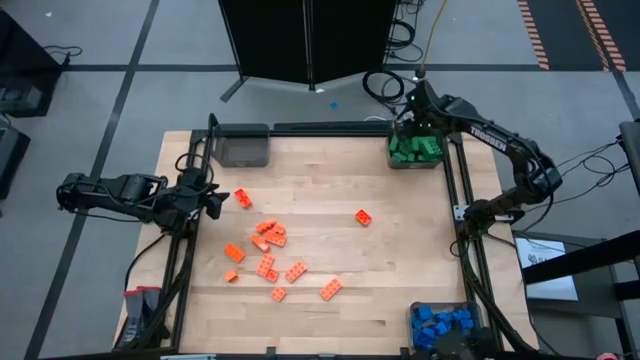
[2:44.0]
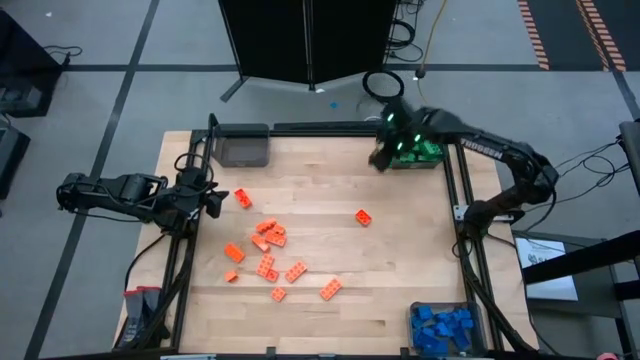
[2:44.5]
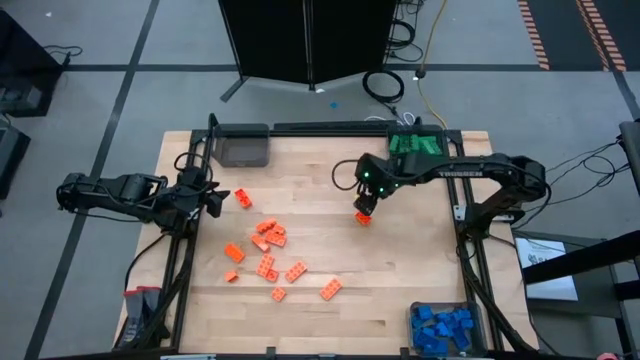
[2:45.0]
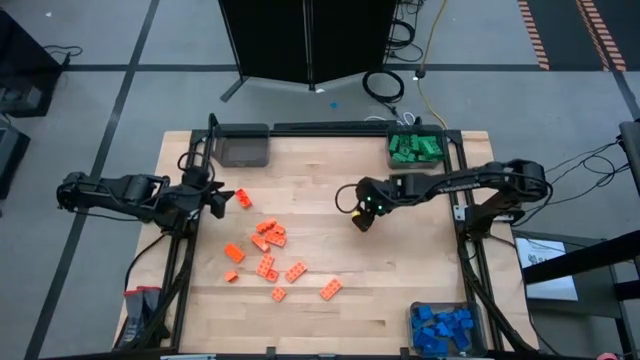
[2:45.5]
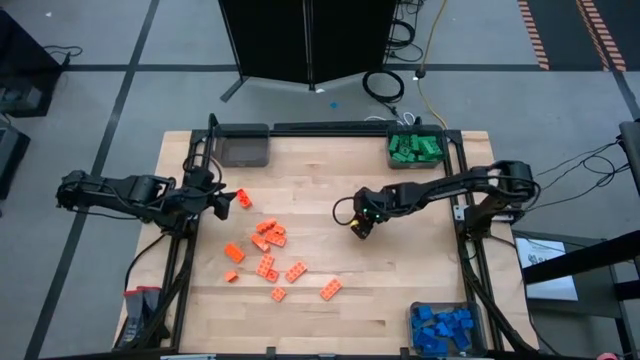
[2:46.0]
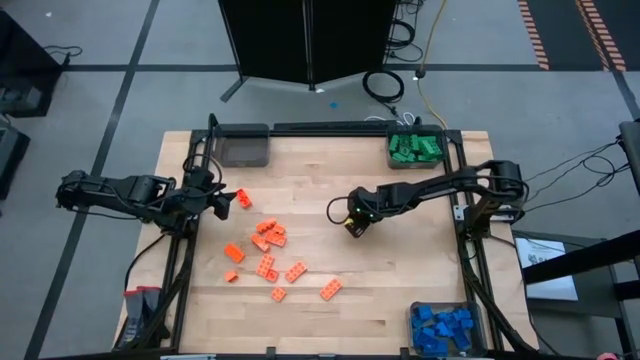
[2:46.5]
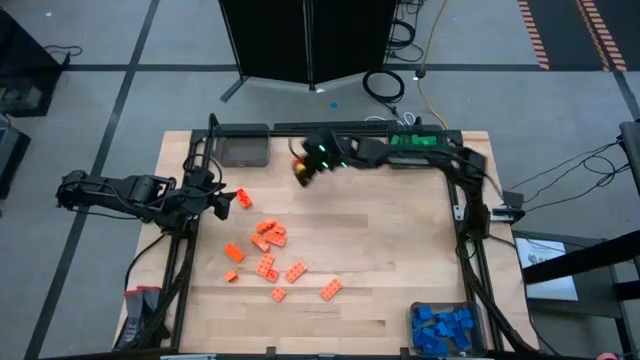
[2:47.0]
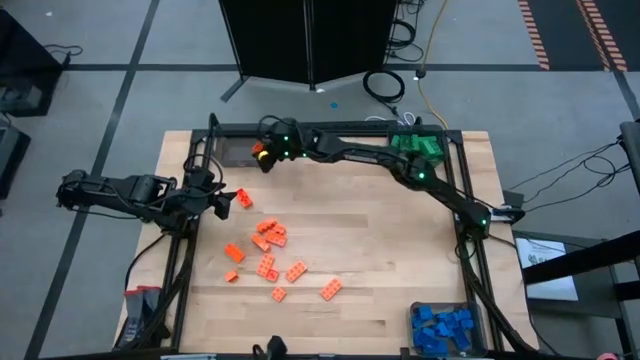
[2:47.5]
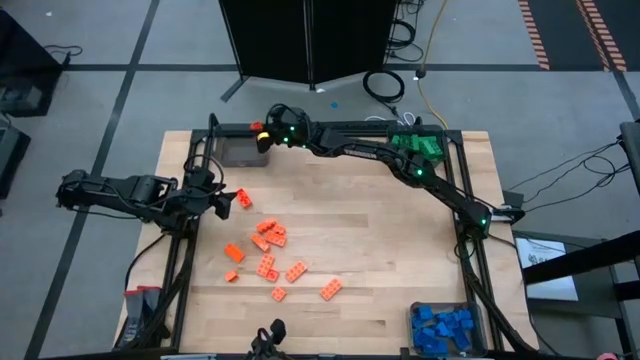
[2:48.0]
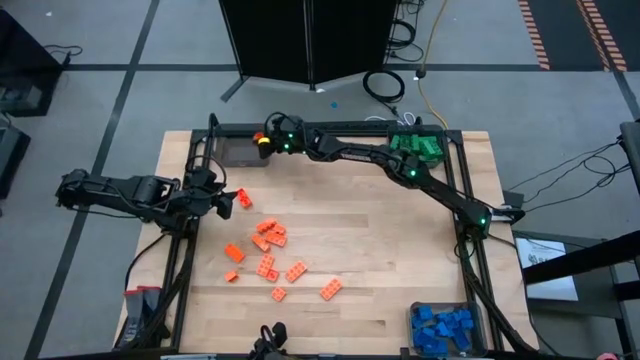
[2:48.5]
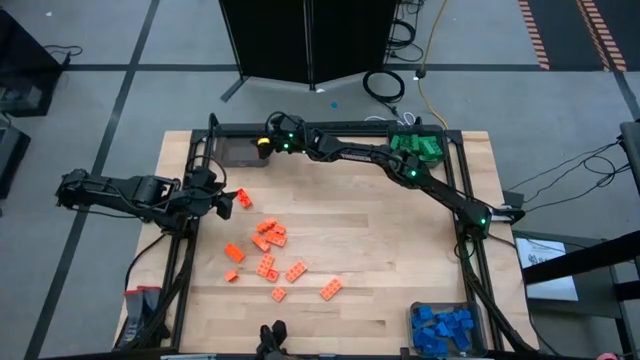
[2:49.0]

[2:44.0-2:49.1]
Task: Sort blocks
Put the orange game piece into the top left black bin

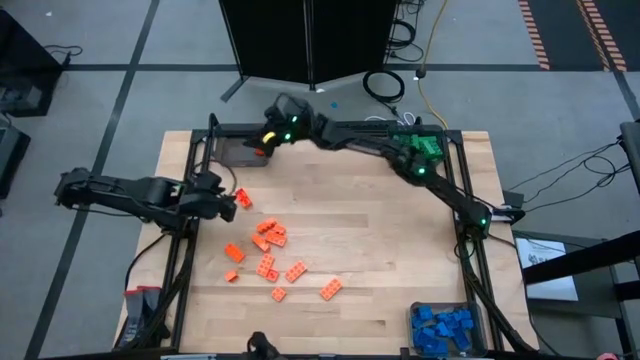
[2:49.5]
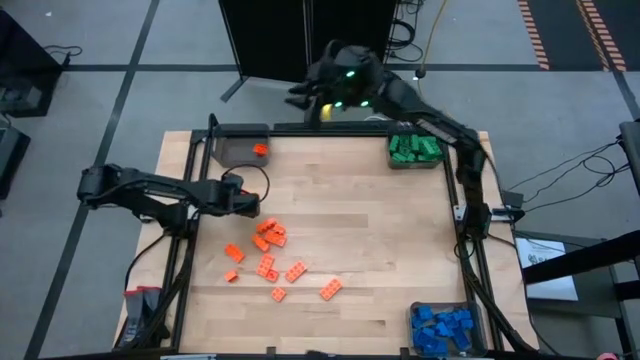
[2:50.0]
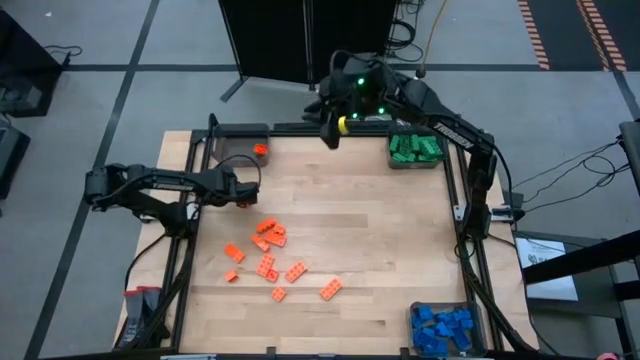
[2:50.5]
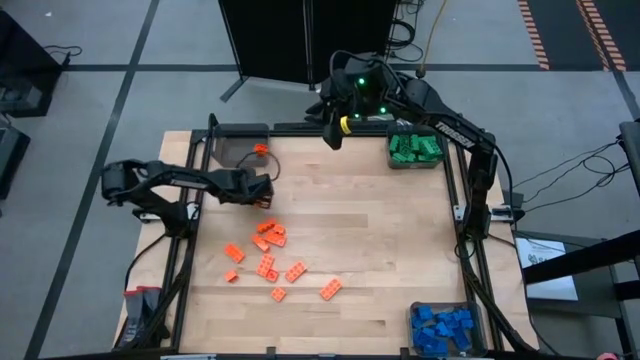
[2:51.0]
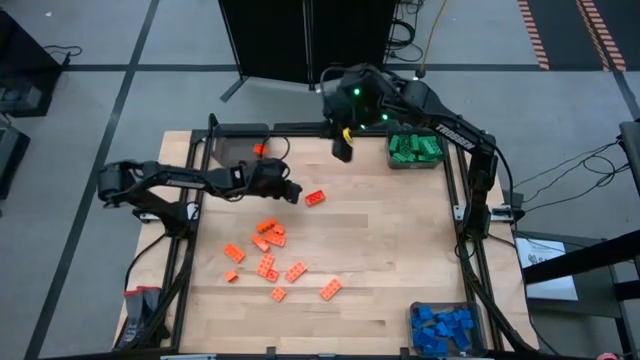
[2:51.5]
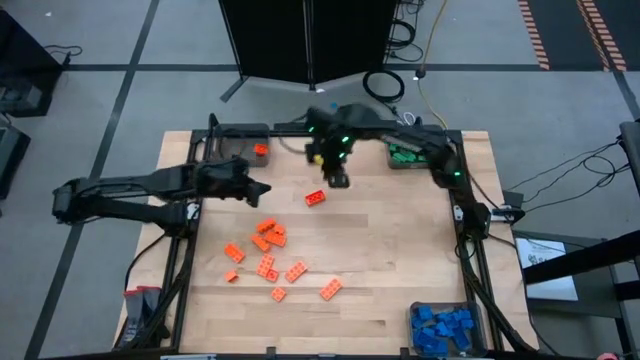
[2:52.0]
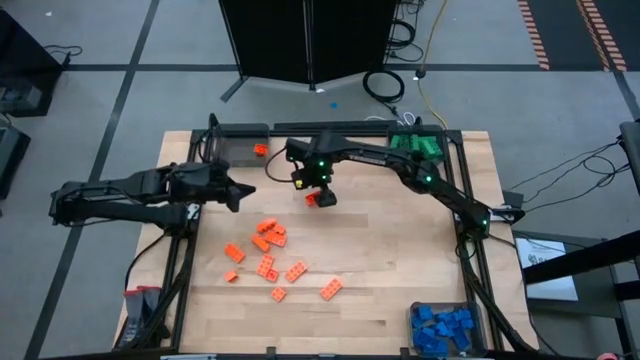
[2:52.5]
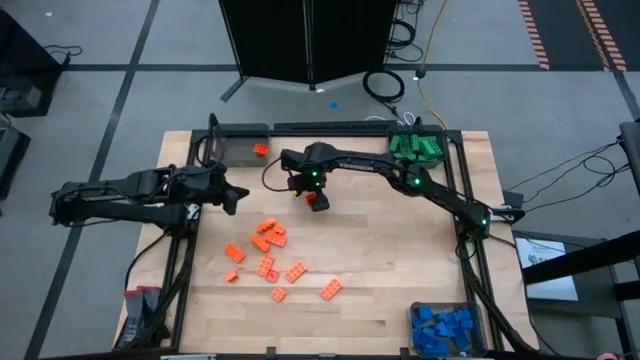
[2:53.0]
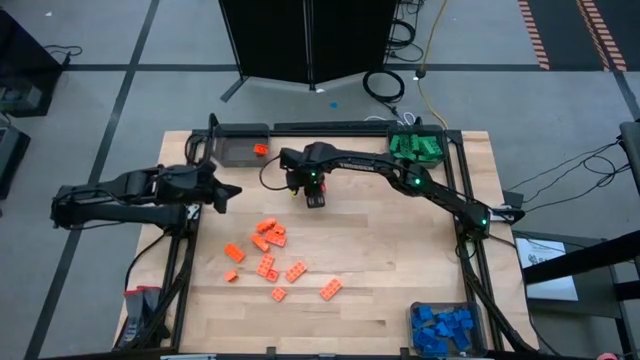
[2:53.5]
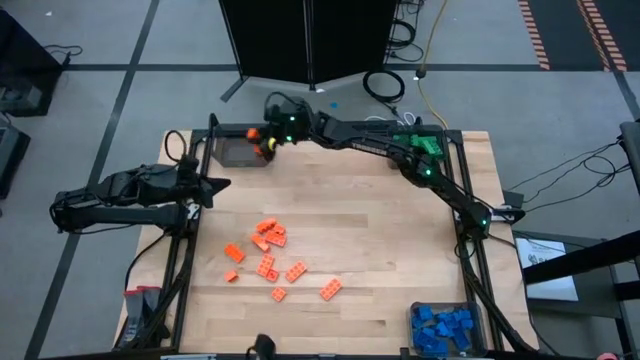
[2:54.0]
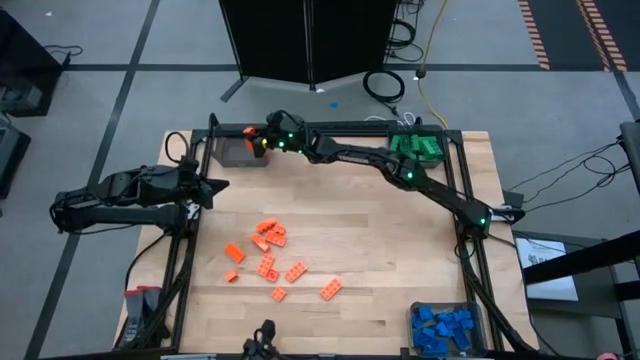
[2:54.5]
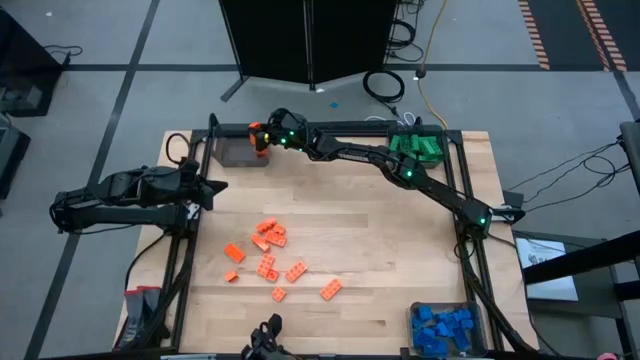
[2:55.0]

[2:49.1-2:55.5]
Put the orange game piece into the top left black bin

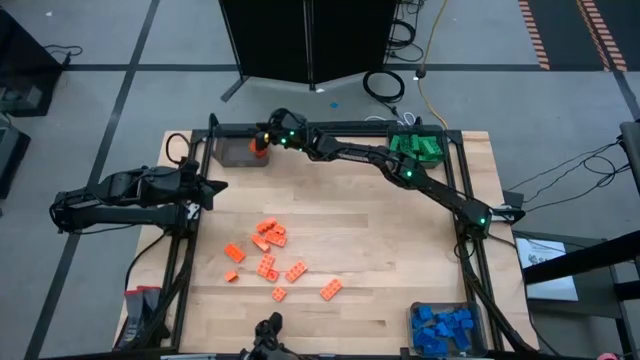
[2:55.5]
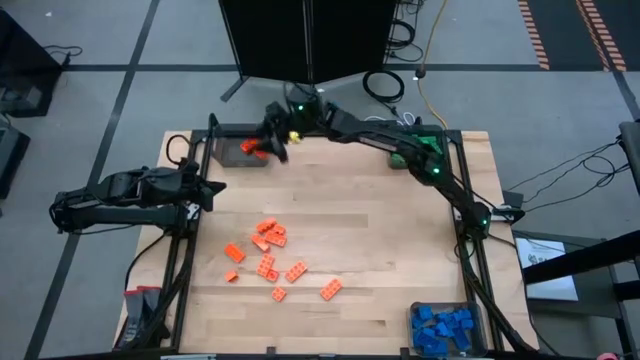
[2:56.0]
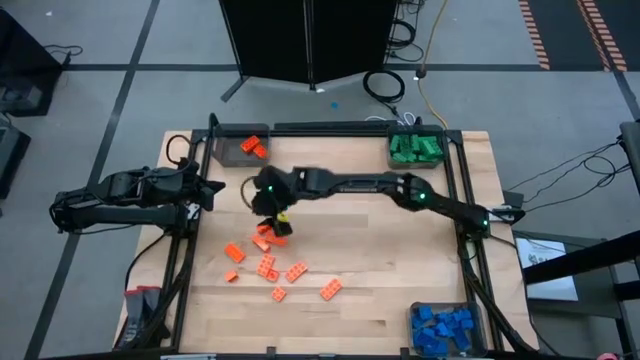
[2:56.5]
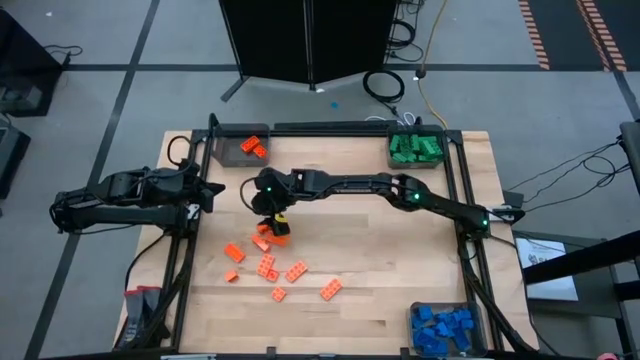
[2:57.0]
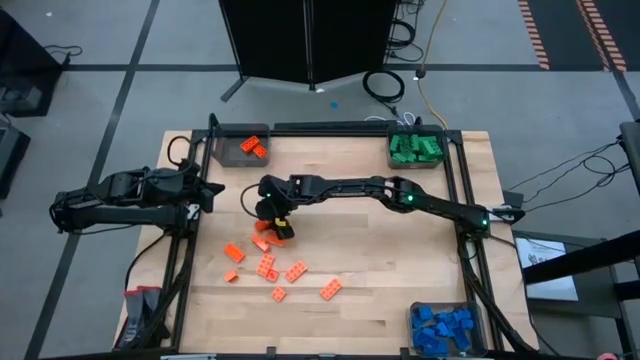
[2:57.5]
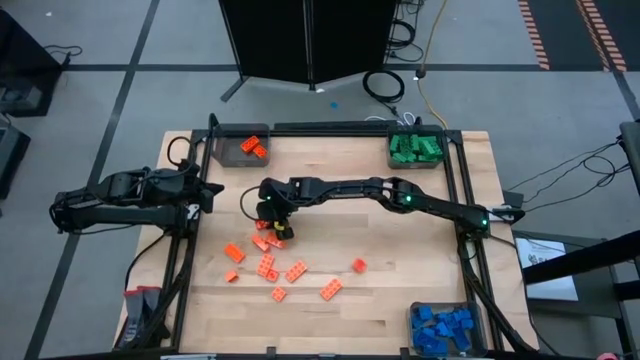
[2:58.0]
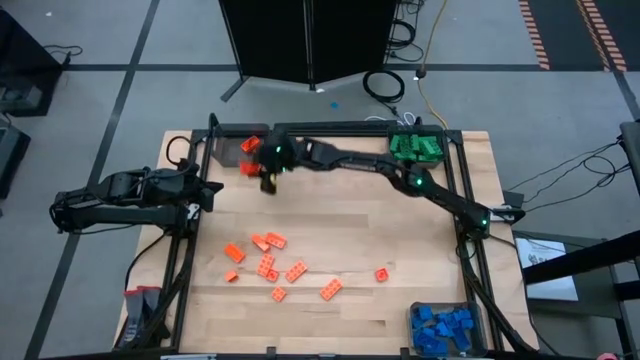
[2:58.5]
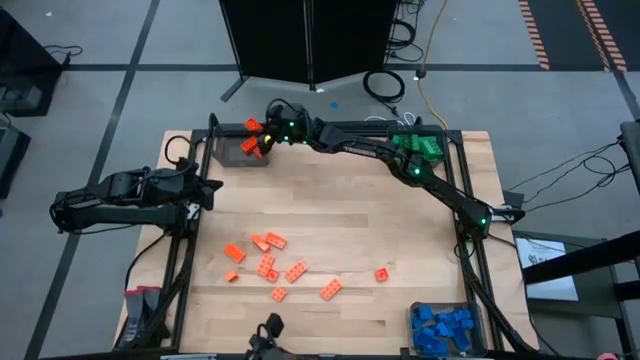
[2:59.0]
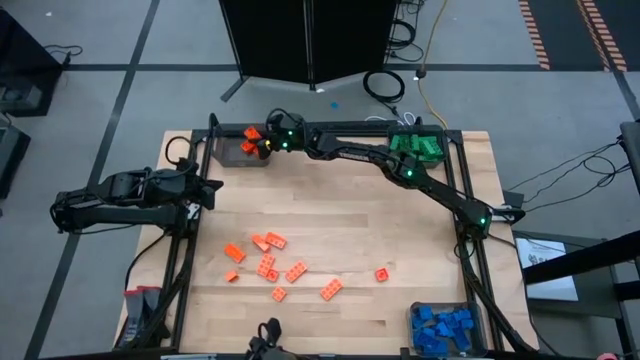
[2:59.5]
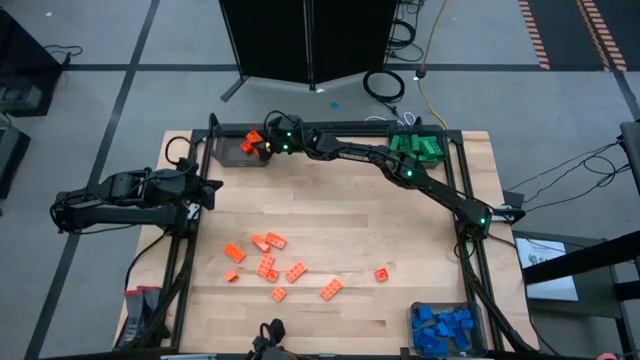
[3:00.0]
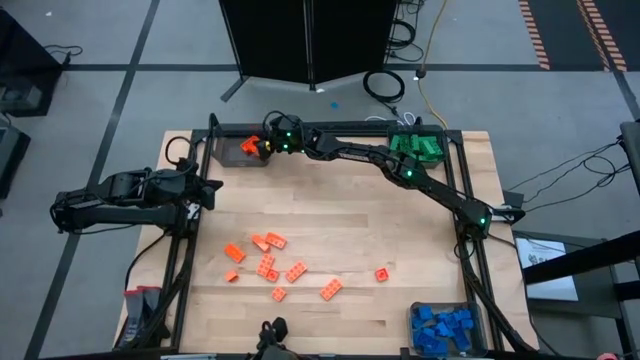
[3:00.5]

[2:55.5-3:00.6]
Put the orange game piece into the top left black bin

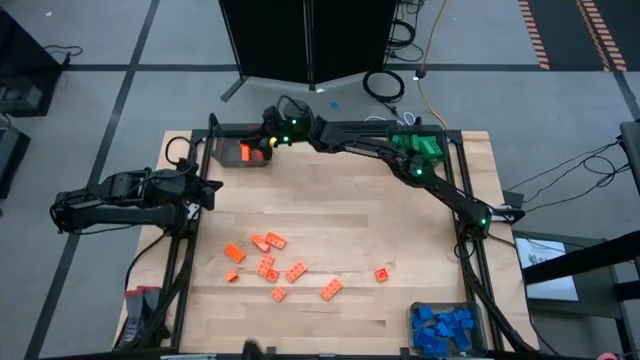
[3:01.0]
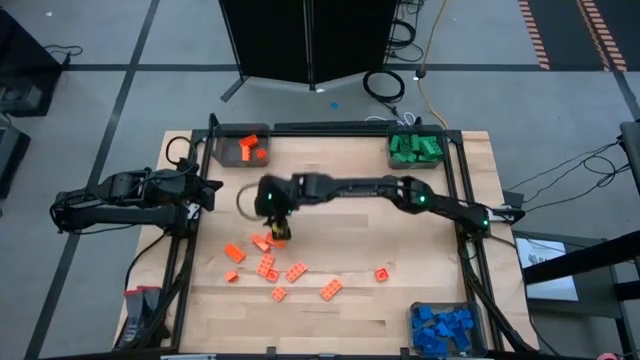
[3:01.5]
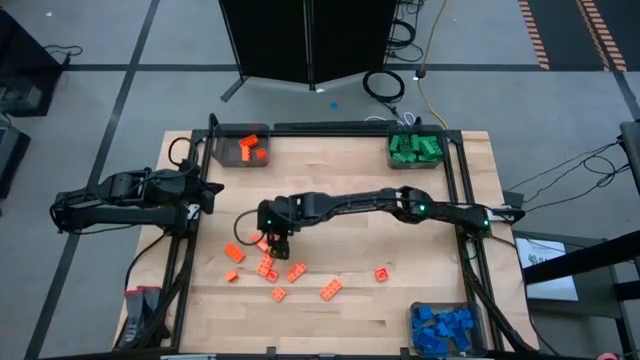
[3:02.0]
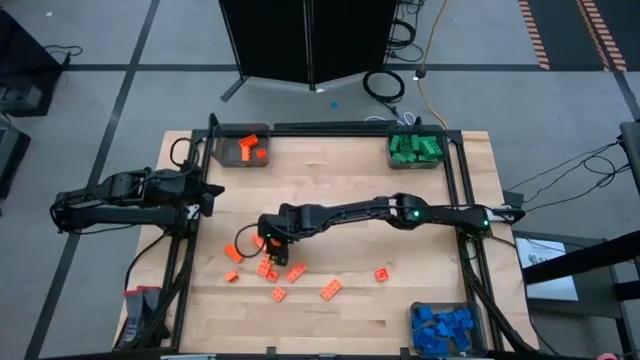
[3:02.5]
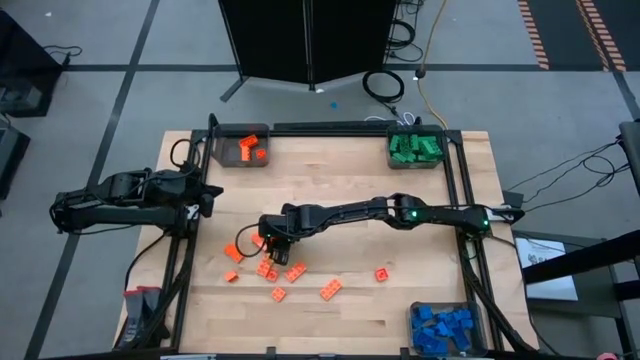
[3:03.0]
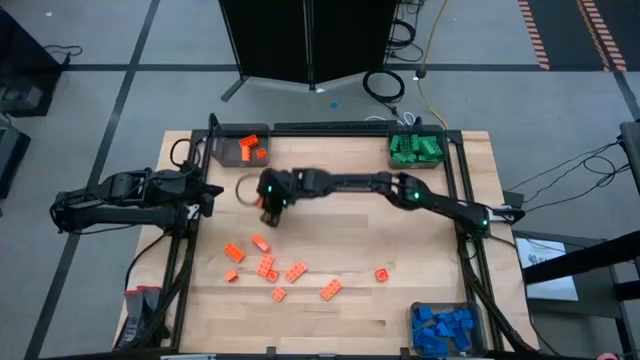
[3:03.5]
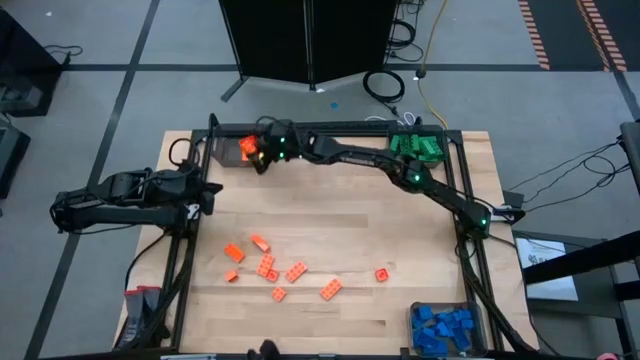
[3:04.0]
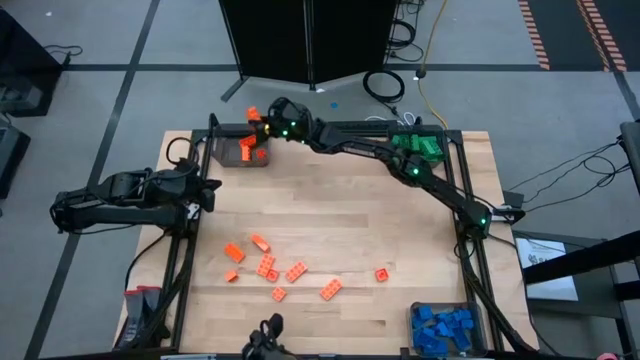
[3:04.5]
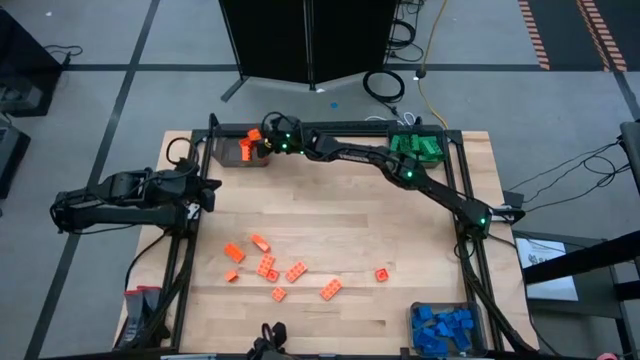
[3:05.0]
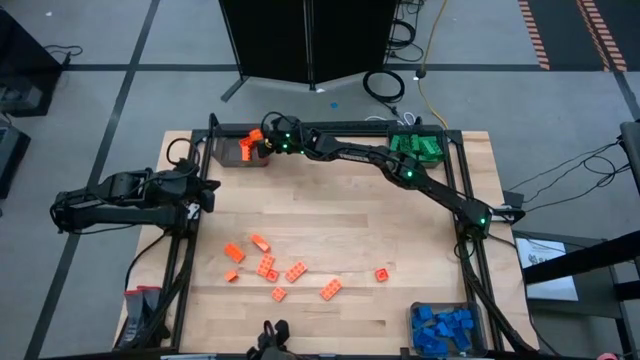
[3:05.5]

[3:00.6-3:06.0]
Put the orange game piece into the top left black bin
